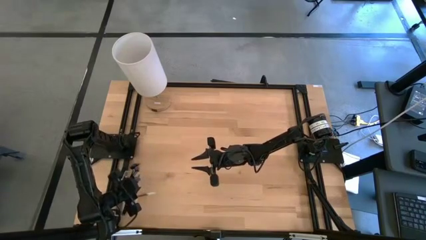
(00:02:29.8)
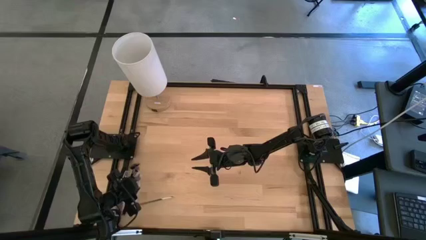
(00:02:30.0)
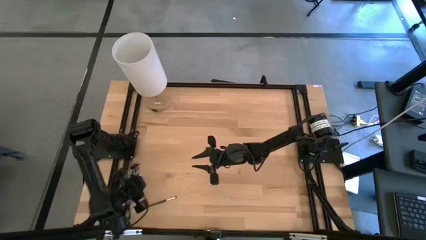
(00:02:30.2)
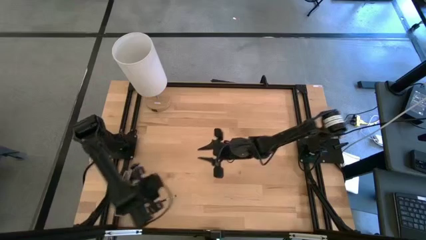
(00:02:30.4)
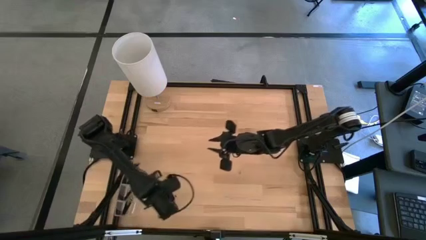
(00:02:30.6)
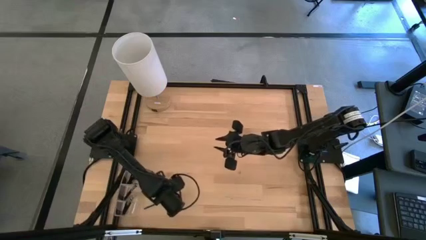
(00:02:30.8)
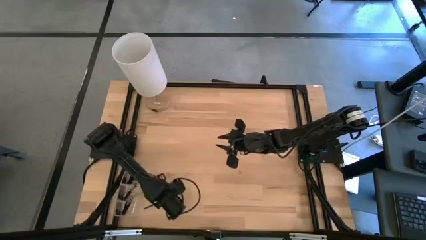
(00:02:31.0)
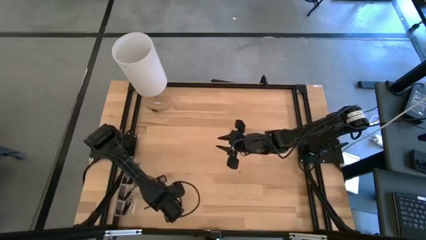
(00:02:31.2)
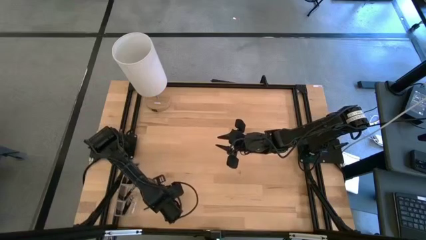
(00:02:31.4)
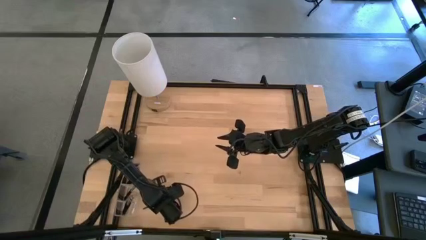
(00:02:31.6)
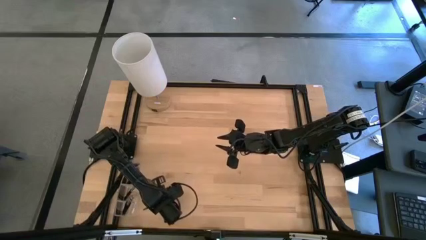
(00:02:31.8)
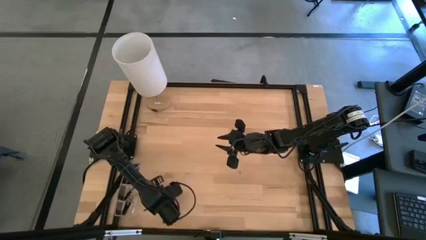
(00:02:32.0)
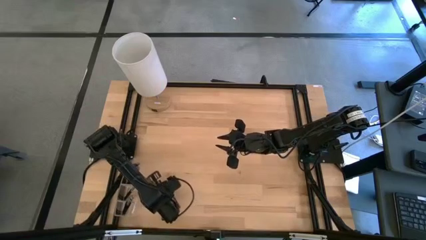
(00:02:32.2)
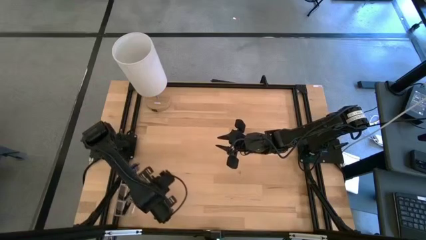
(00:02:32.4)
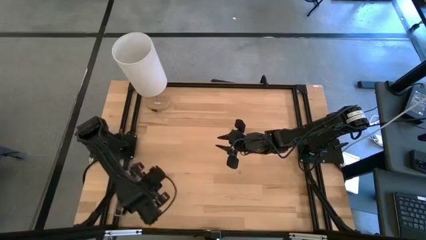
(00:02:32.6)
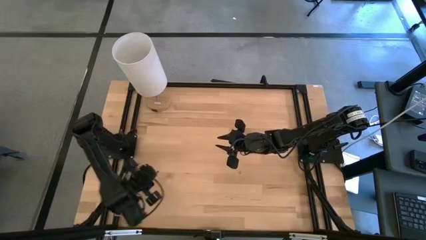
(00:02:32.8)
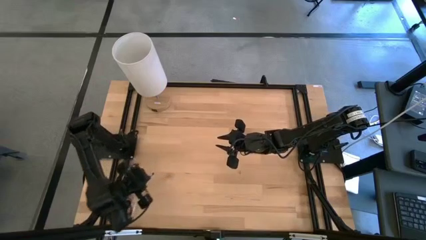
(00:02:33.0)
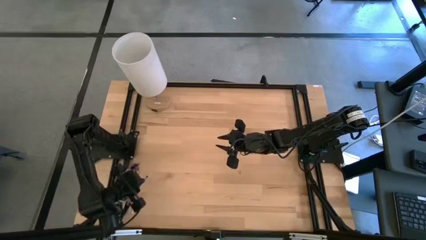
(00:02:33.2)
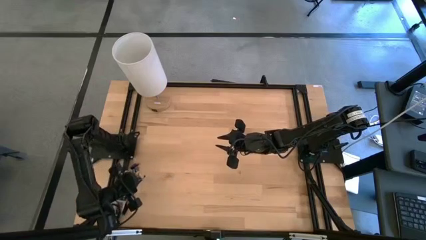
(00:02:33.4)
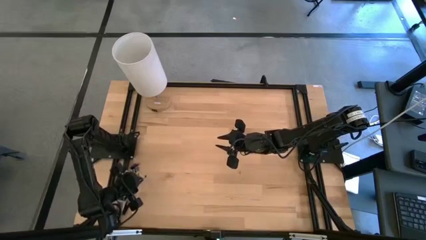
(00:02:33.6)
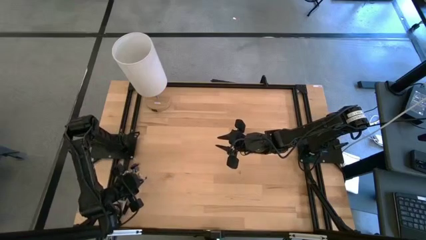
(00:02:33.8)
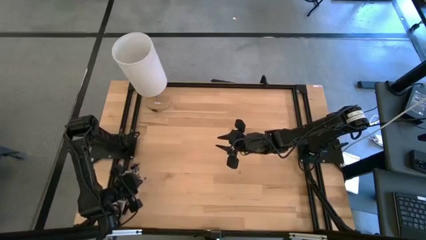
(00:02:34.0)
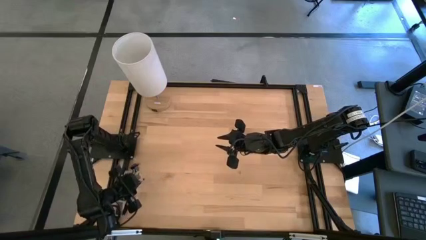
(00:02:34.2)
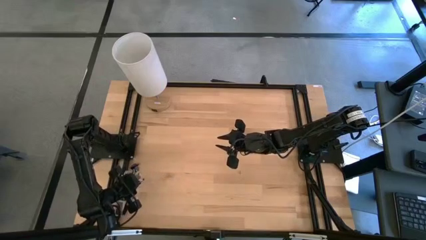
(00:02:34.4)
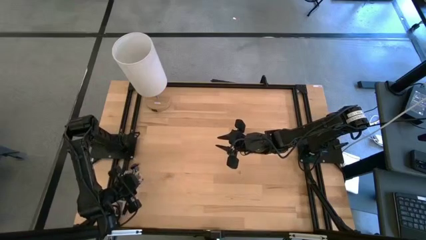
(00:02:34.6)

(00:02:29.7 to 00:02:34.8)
Task: Pick & Place Makeup Supplies
Put the makeup brush into the transparent organizer

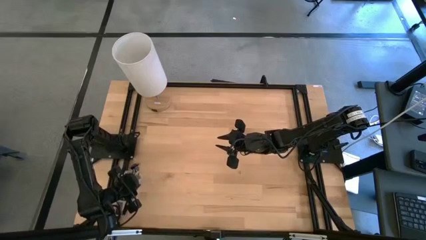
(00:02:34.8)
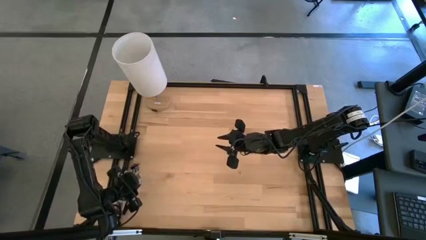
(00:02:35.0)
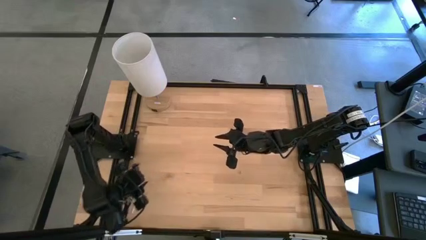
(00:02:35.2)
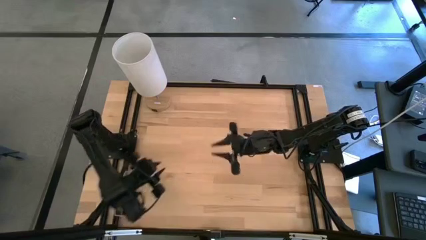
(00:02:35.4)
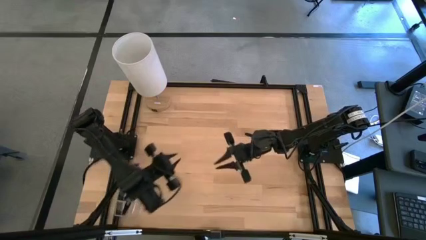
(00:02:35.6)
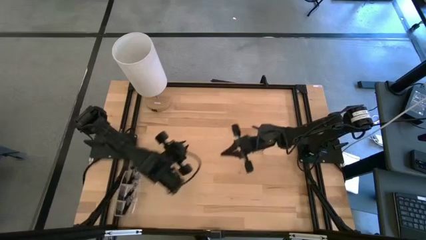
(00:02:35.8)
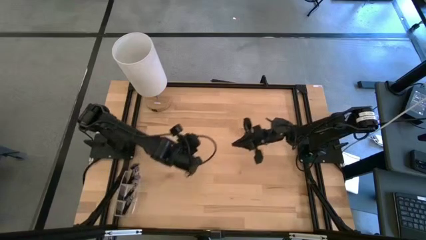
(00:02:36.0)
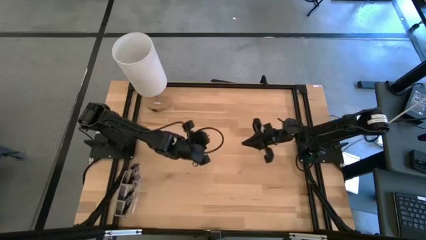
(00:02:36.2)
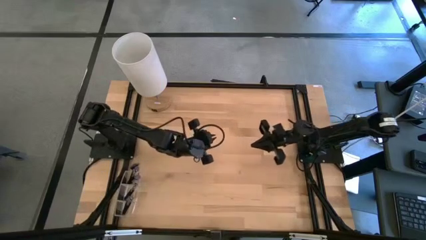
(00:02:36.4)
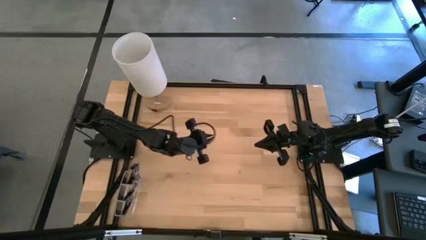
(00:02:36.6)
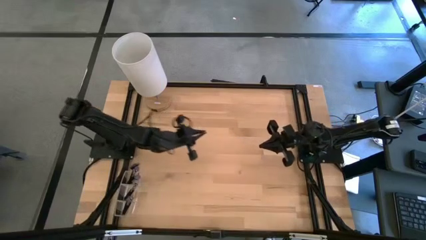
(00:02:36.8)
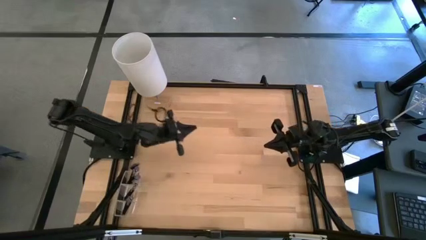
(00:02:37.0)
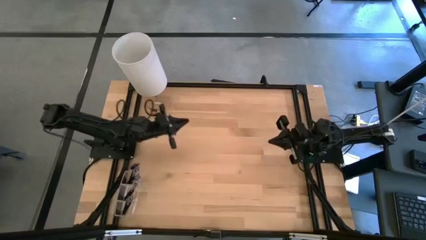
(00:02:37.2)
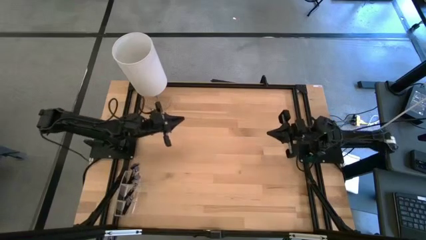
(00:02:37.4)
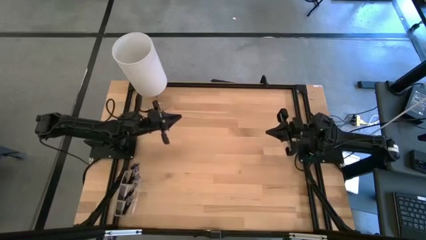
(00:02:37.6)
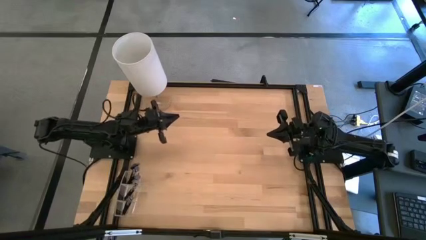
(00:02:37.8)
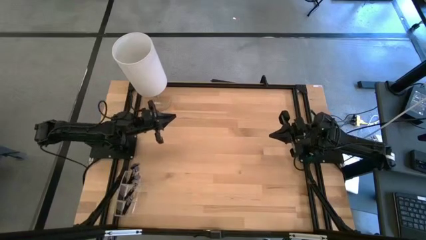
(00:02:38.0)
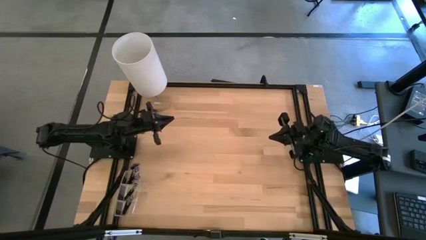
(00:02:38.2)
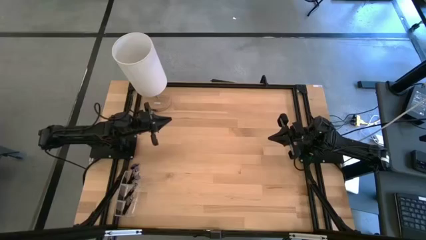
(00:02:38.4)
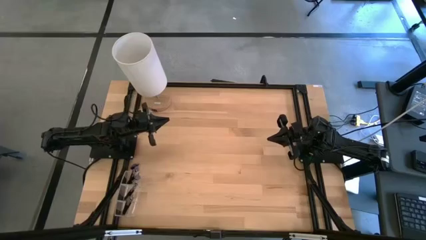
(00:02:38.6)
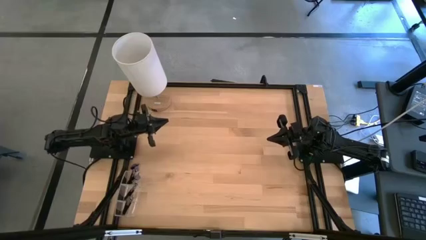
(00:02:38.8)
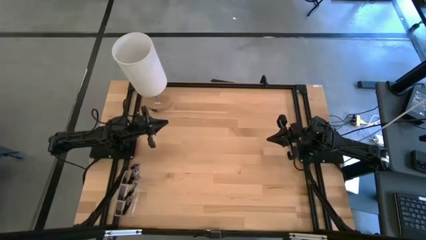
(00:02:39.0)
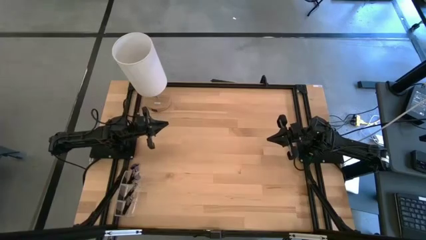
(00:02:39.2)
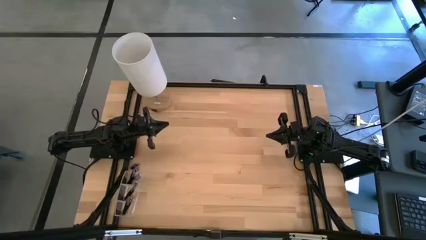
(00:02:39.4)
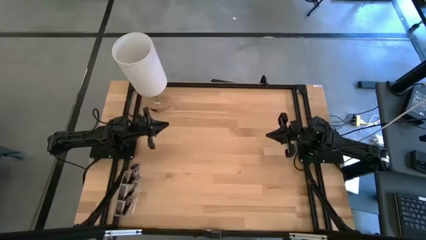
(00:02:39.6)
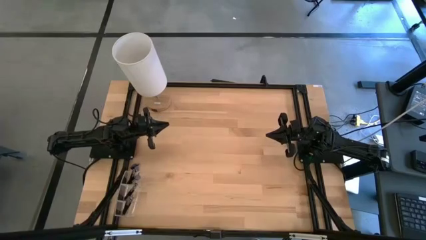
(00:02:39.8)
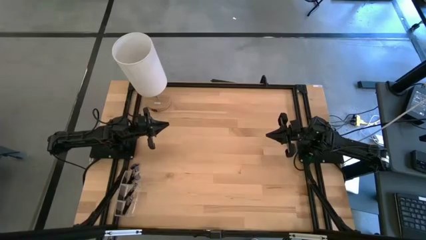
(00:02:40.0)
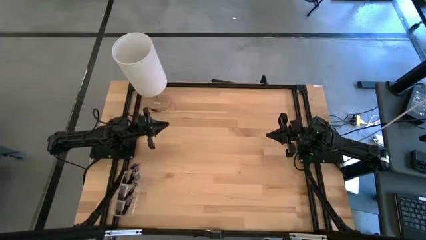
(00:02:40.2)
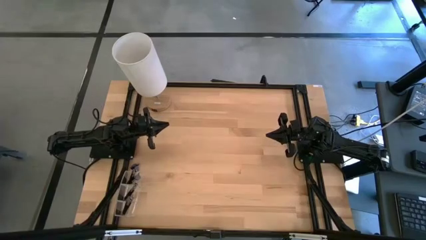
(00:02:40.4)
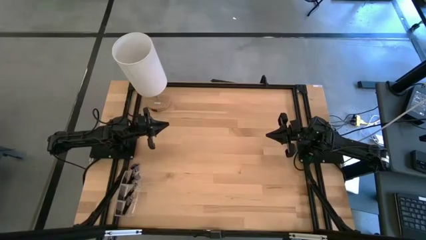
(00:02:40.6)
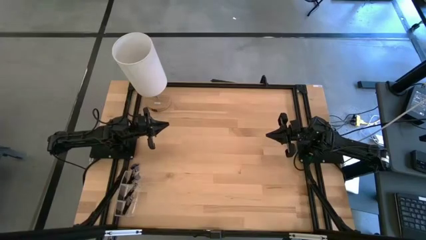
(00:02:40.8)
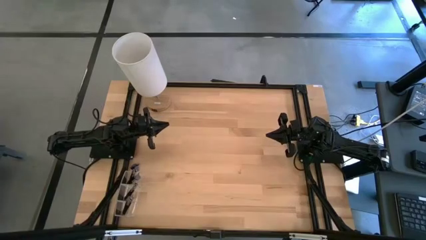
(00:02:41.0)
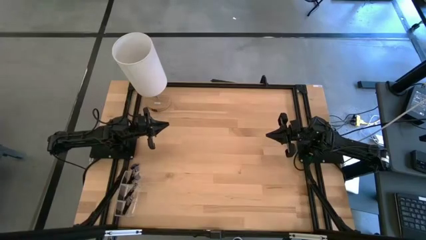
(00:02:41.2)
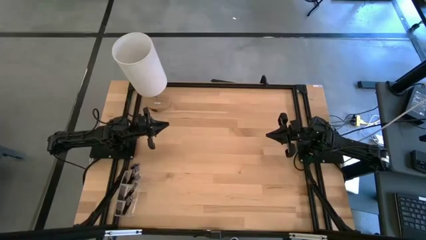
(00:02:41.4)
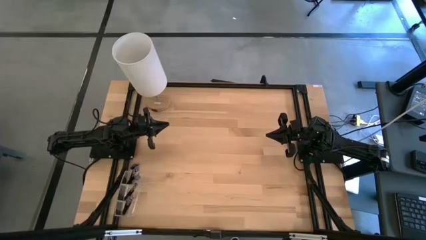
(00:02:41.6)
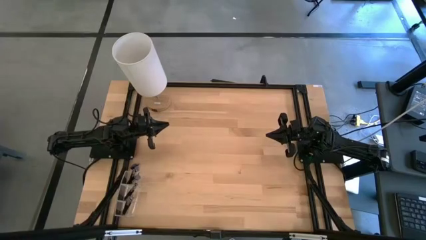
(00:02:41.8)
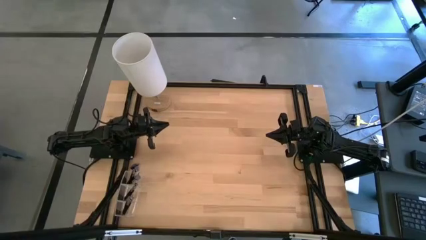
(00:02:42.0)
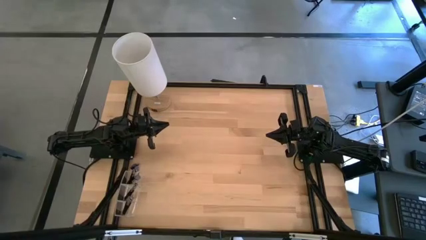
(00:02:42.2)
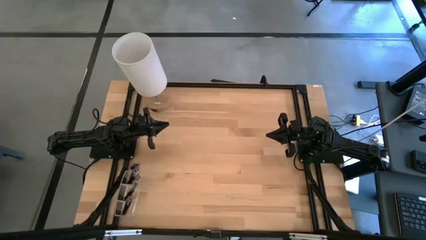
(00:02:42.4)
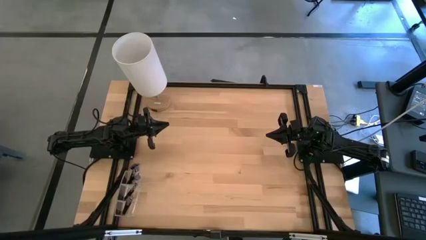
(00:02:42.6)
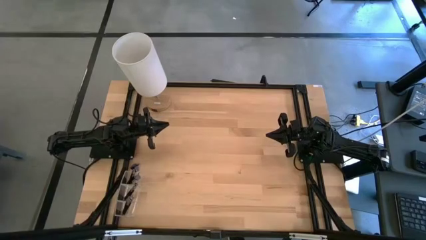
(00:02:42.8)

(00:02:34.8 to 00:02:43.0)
Return to Home Position
